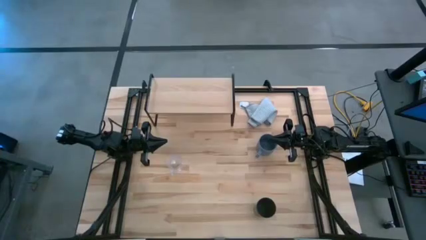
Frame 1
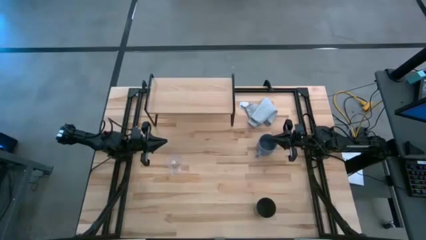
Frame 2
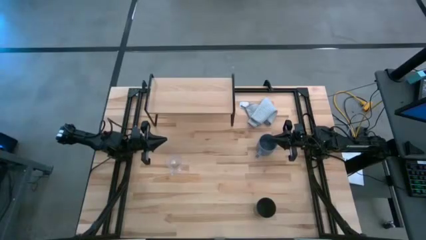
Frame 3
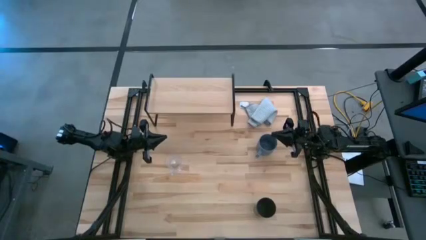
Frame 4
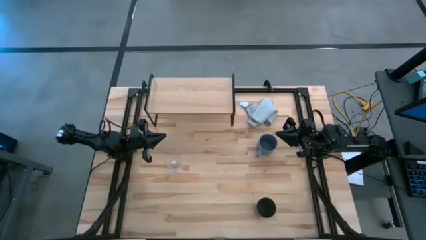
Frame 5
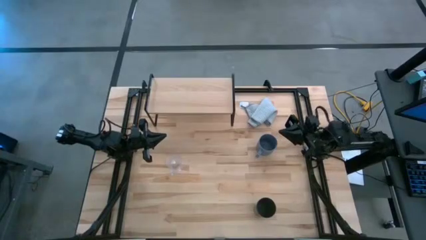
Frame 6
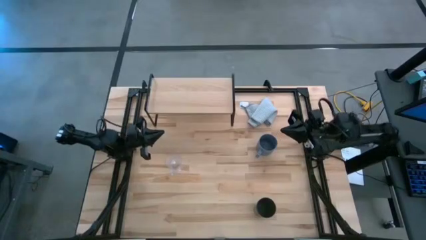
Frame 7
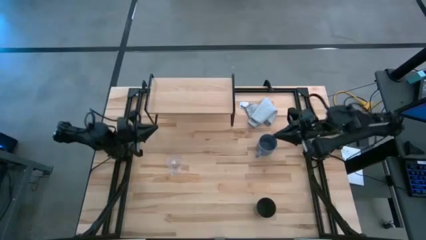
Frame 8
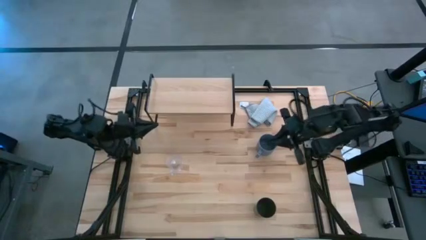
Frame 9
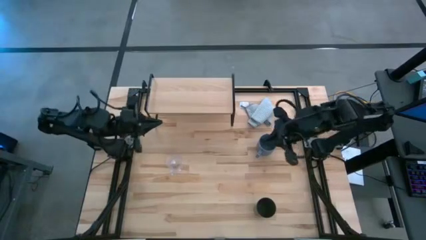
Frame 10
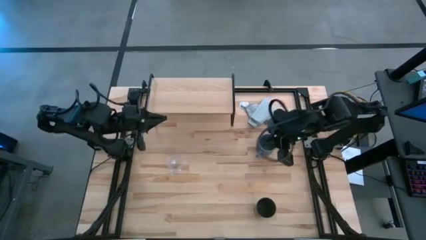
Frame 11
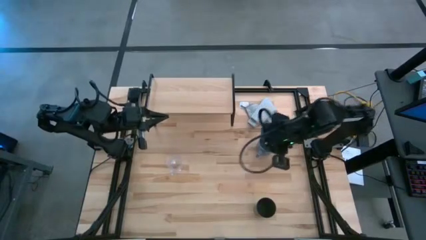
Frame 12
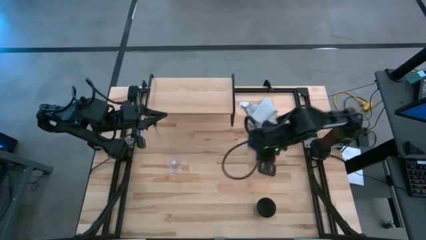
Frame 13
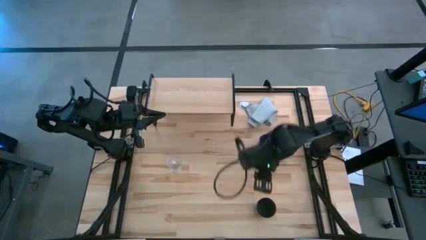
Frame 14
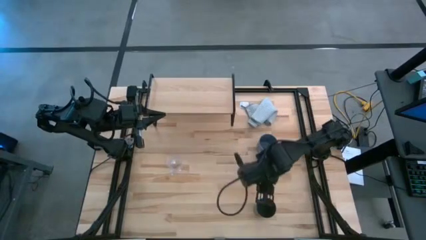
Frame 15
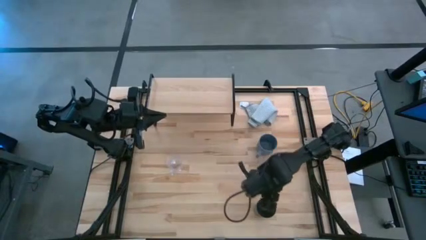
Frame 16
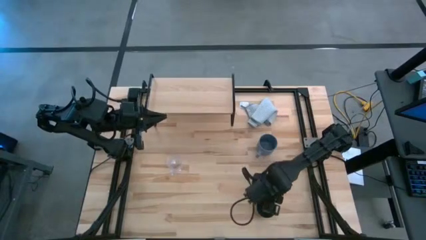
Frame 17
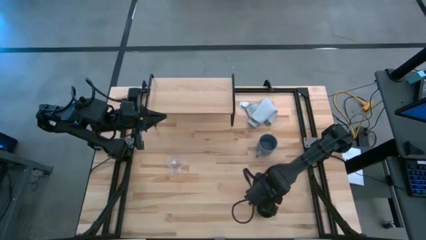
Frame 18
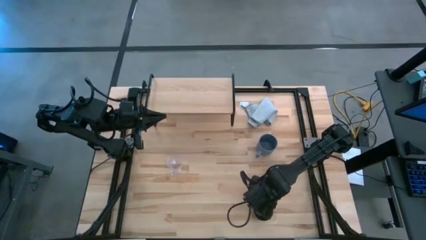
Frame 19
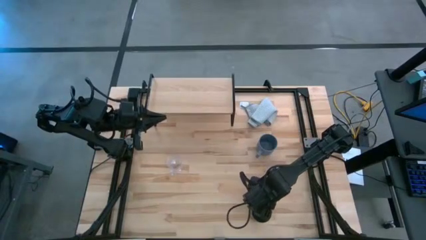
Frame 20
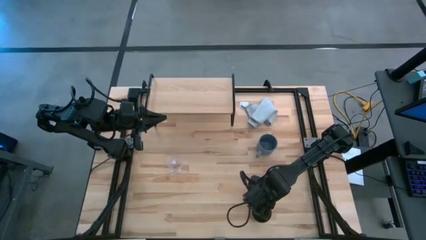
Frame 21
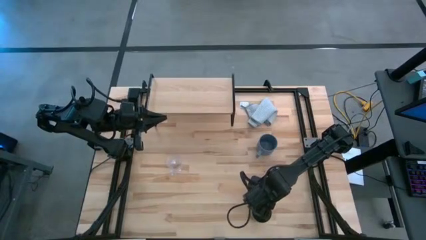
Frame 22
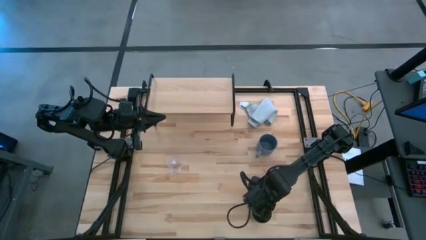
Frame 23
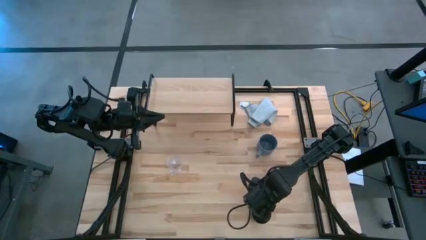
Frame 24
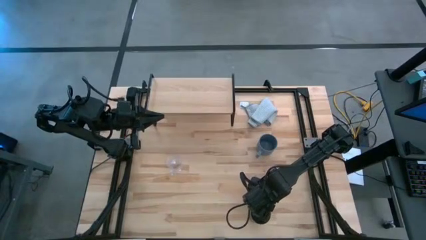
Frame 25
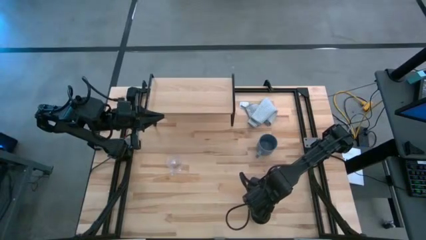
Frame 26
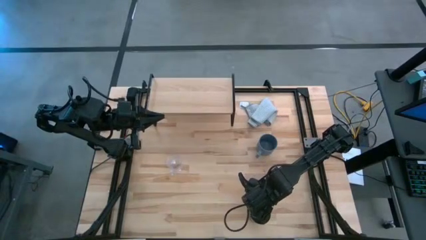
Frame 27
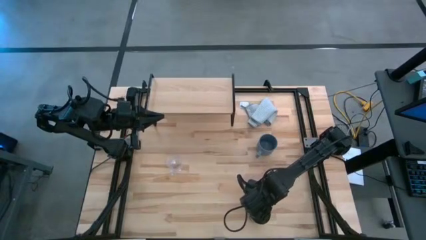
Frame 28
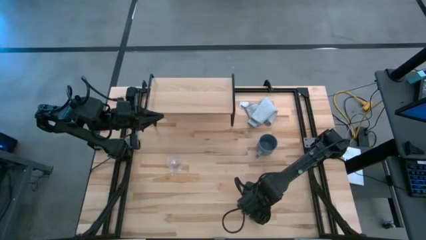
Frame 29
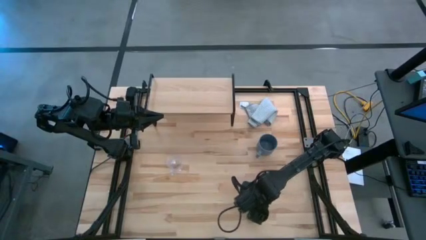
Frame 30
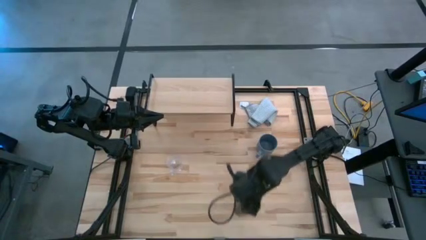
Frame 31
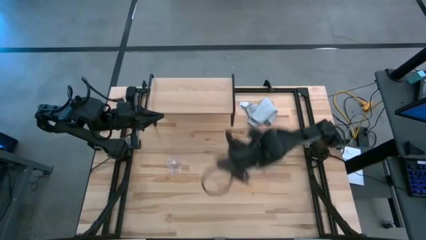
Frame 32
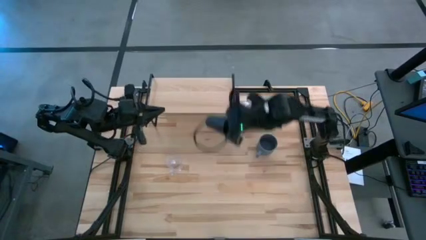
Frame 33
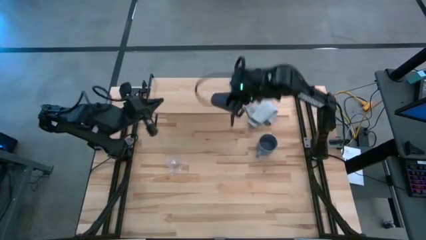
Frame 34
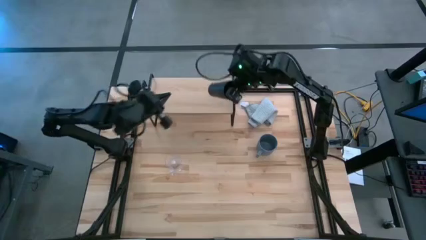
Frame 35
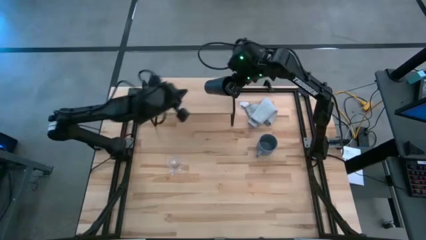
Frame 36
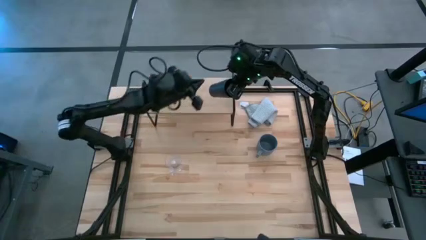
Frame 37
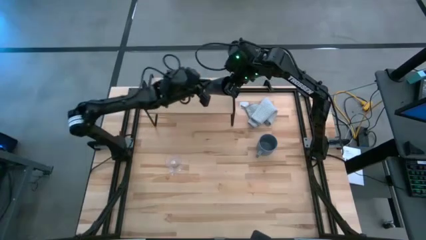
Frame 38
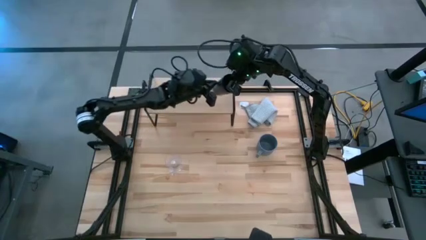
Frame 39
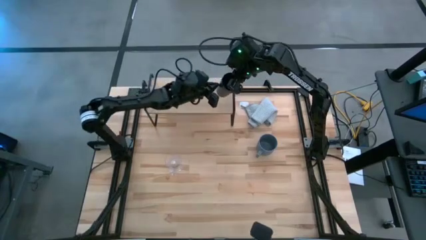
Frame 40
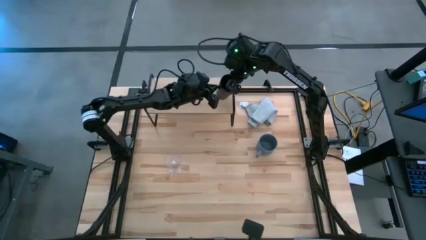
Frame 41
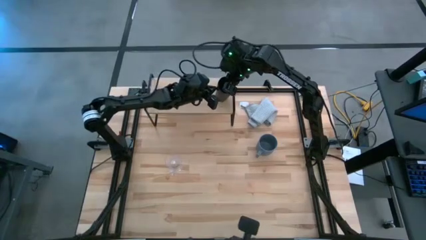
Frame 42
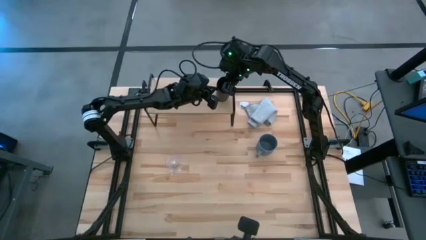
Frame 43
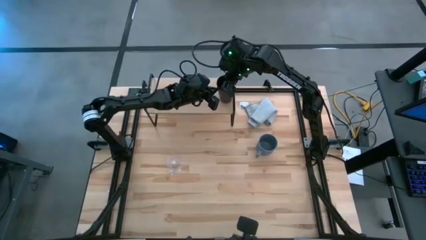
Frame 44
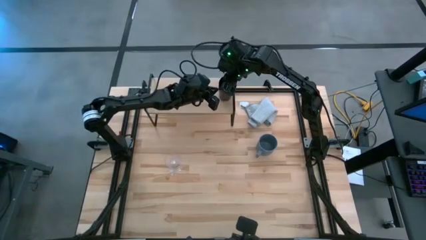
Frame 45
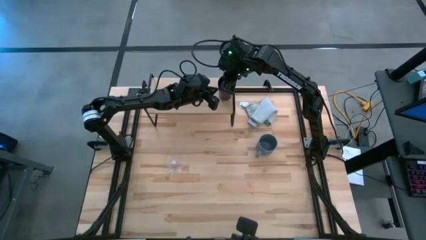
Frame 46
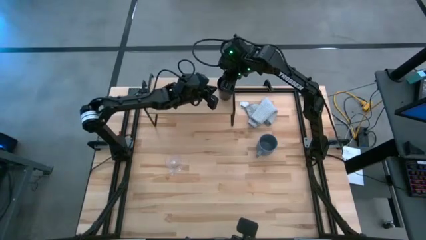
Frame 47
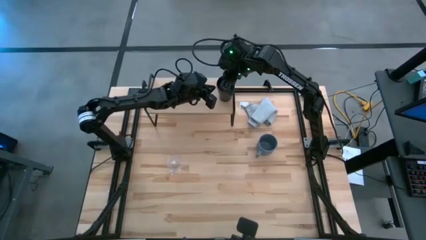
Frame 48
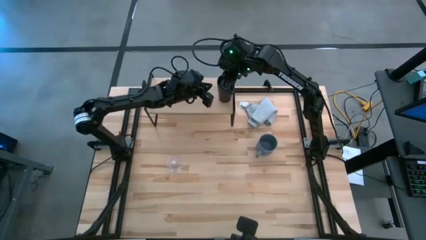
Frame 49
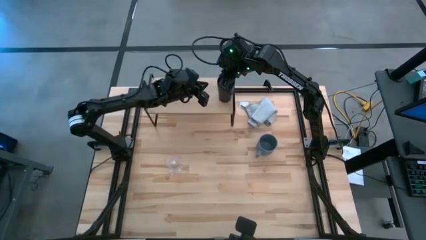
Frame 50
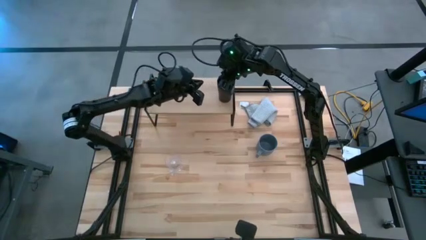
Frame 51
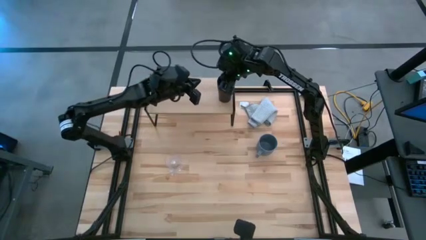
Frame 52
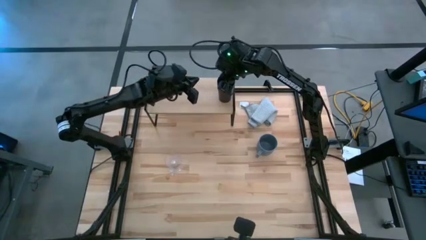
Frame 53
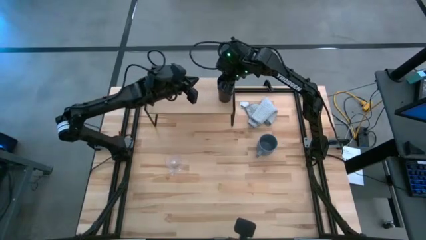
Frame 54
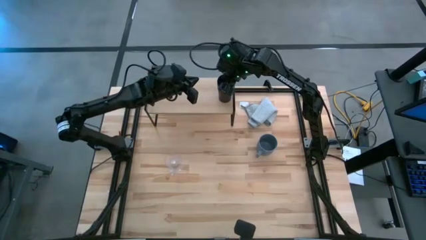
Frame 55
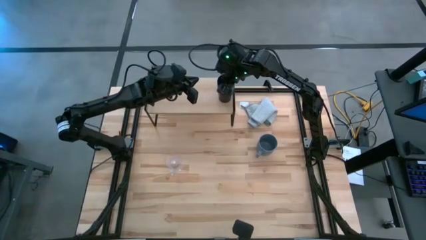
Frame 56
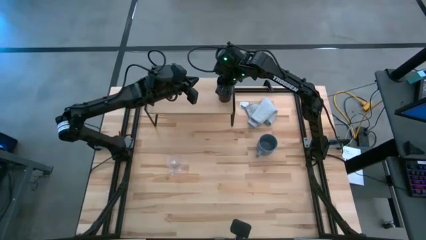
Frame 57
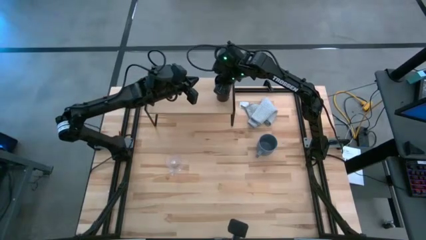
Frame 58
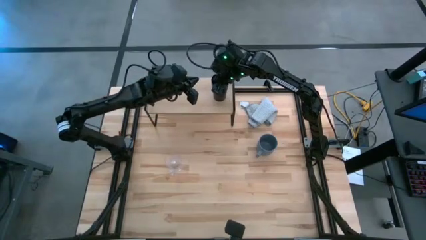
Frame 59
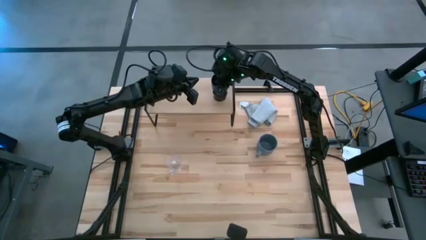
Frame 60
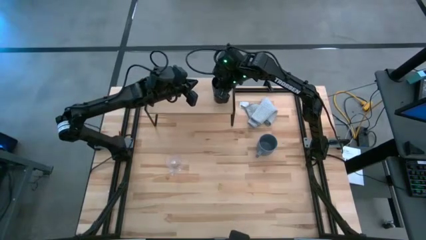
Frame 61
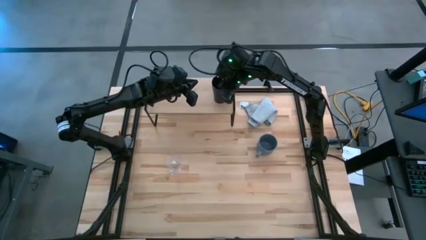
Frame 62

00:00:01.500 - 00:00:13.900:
Task: Stack small to large cups/mugs on shelf
Put the black cup on the shelf
